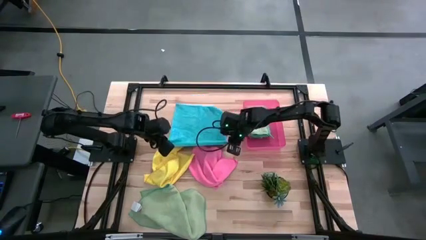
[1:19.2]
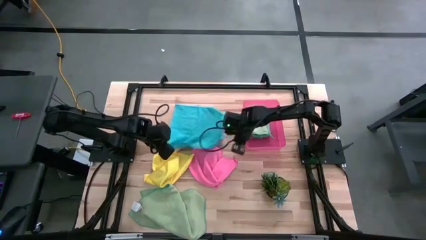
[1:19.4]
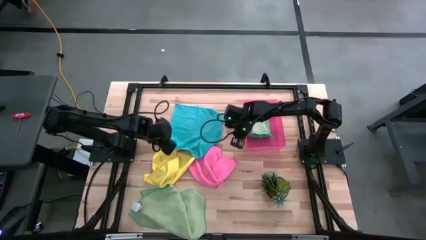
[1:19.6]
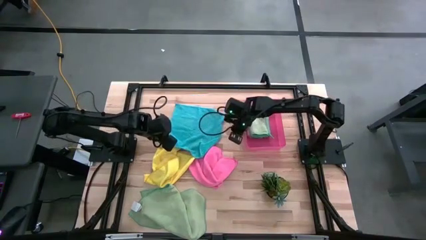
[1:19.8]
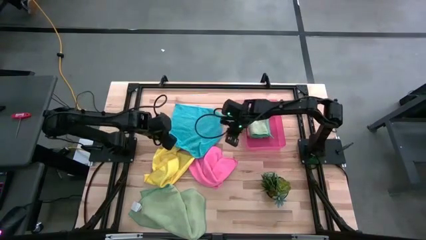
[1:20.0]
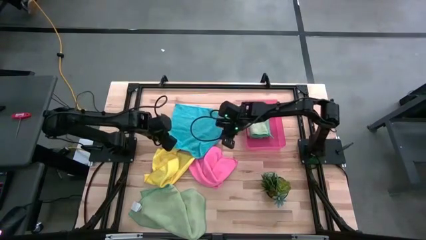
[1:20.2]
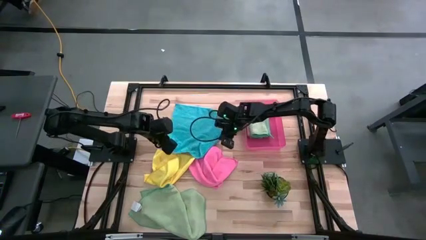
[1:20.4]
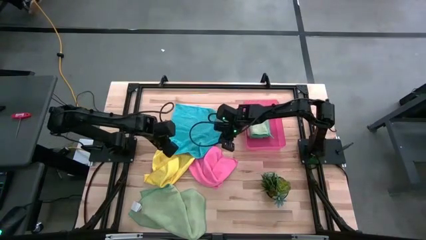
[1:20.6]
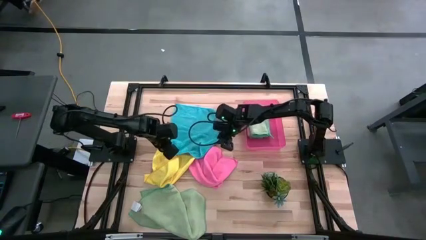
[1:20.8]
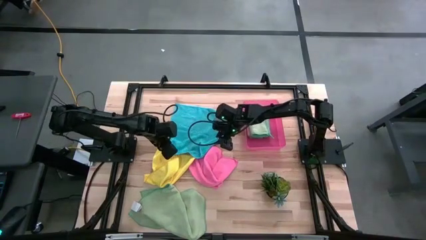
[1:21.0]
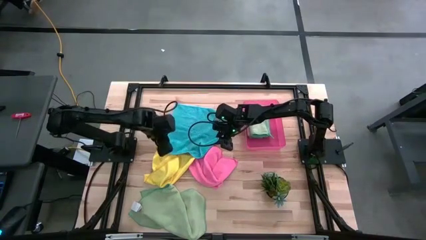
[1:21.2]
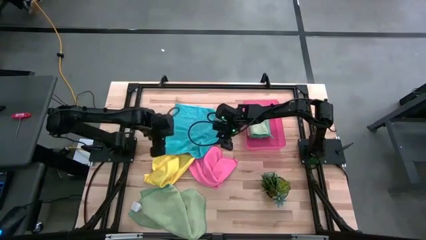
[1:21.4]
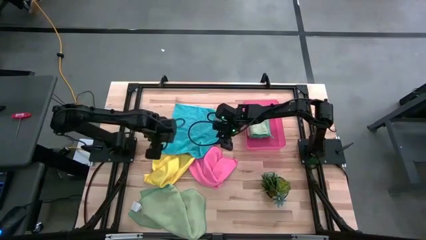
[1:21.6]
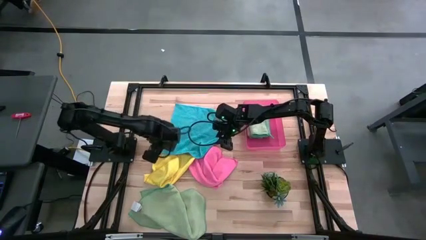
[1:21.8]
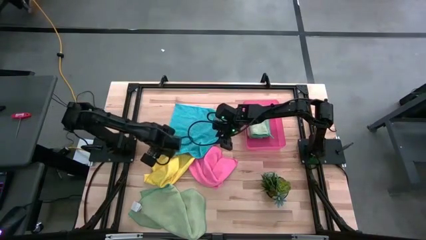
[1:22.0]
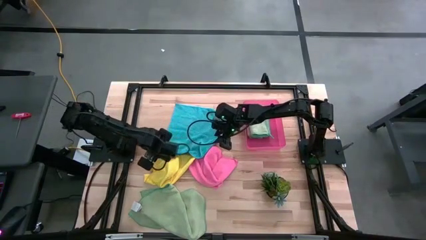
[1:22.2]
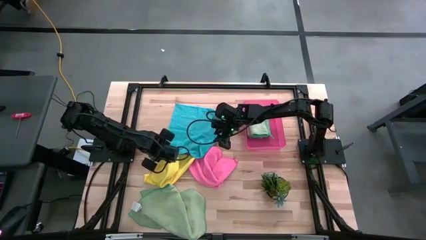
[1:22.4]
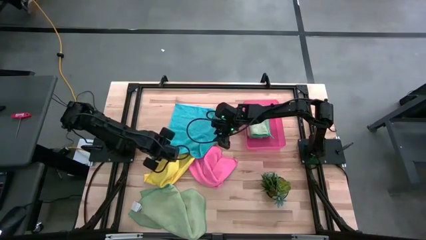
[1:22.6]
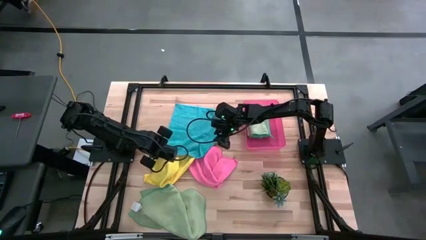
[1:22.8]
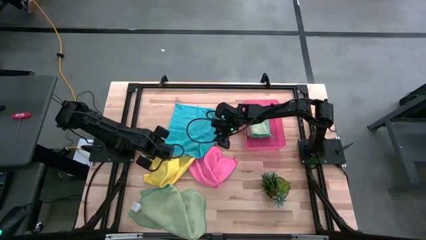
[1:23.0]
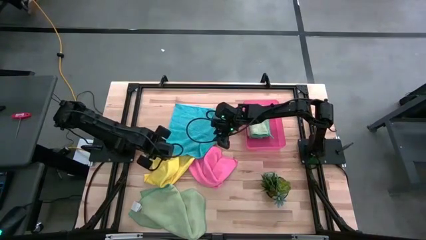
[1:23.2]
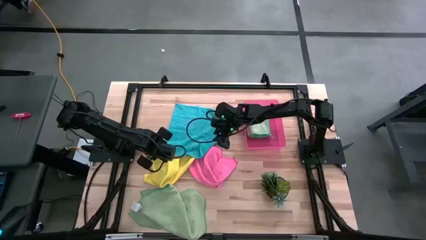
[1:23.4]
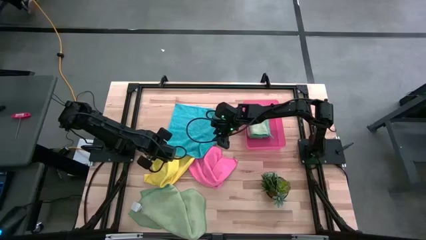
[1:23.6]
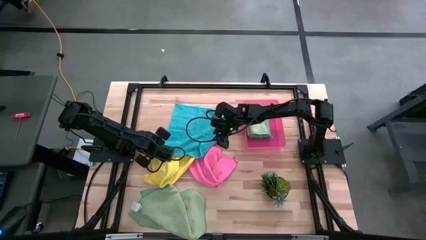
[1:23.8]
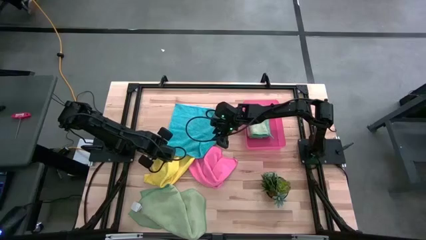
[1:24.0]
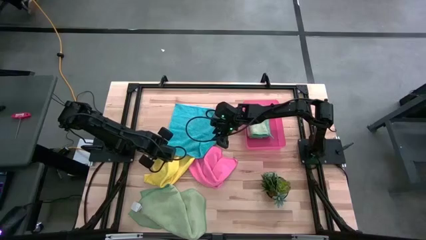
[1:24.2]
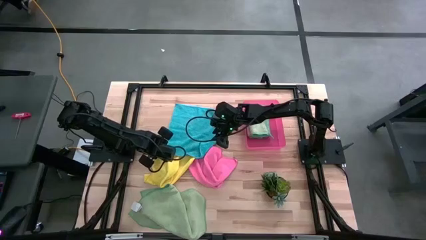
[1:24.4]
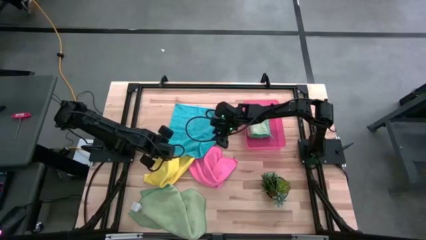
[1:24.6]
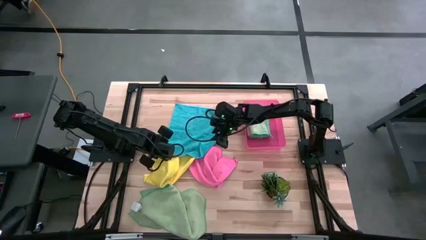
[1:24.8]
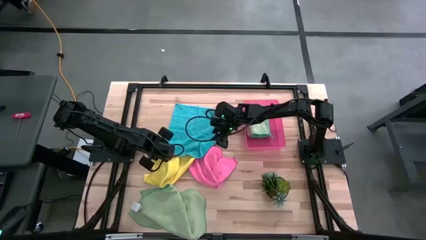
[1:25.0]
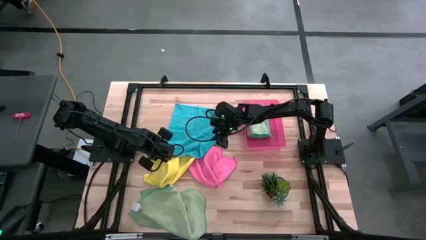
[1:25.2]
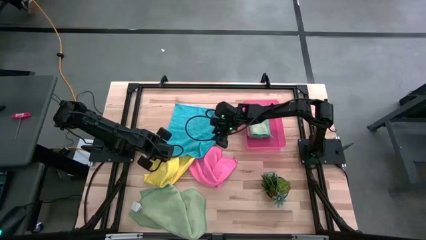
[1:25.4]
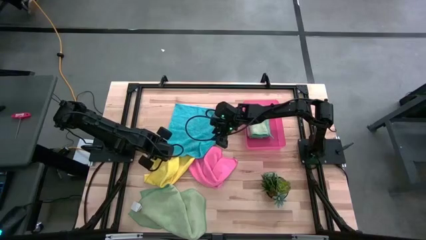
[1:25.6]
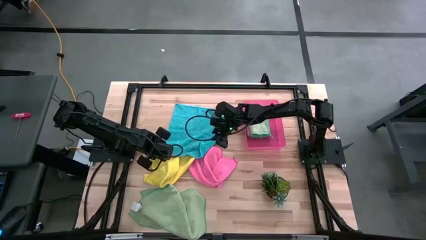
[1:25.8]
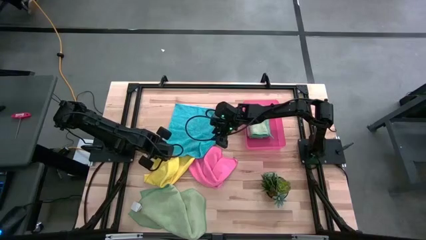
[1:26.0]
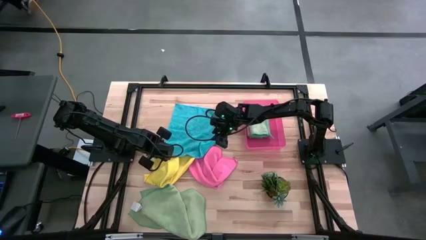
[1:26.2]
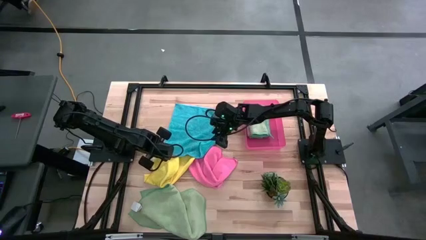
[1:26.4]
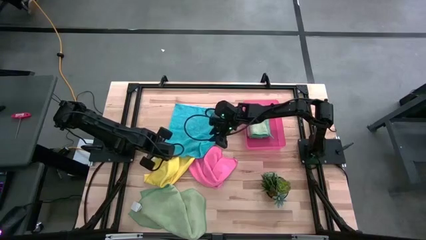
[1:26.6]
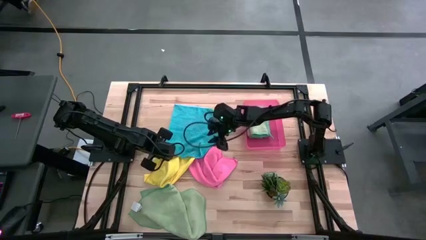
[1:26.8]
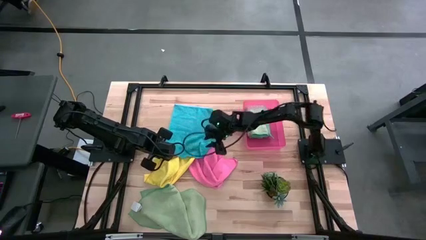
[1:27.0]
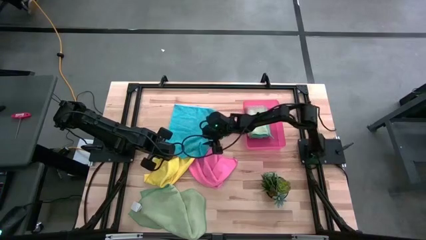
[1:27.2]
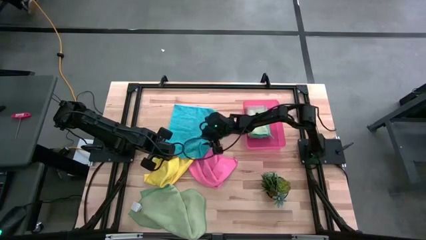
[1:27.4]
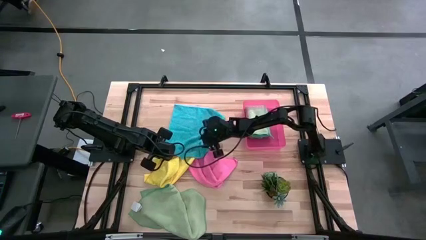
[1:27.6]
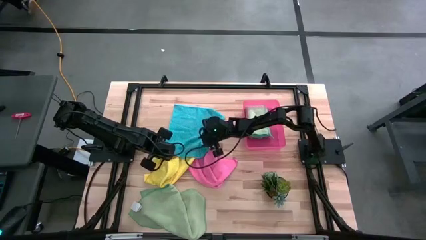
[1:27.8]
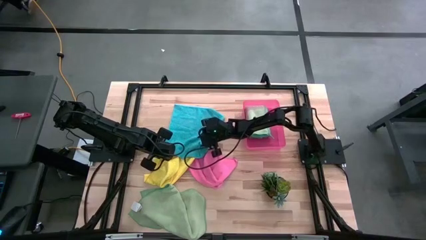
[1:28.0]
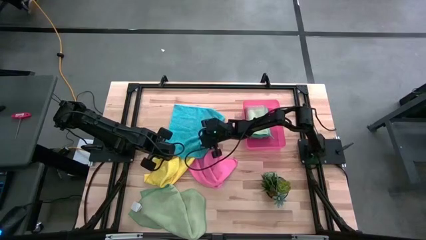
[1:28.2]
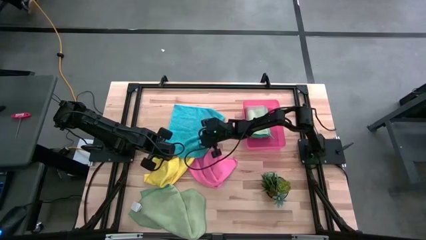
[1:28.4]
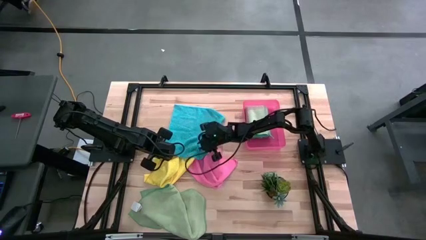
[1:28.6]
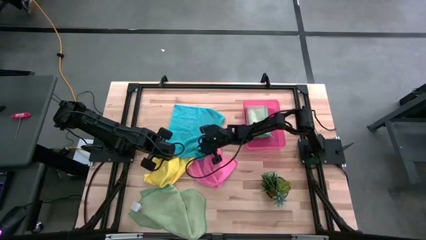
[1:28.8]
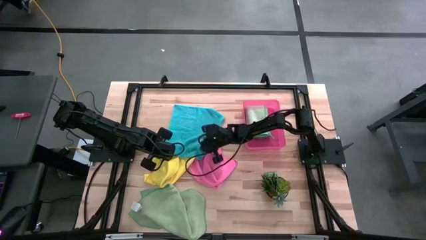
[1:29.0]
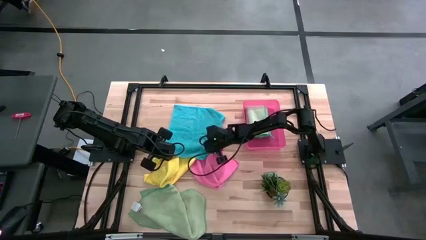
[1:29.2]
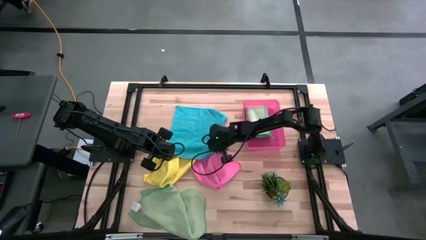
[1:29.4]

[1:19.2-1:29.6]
Task: Fold microfiber towels
Fold the blue microfiber cloth

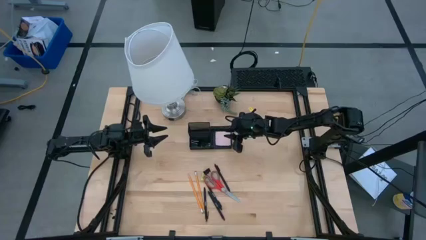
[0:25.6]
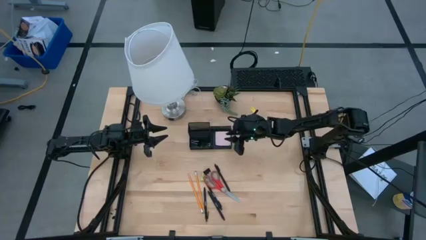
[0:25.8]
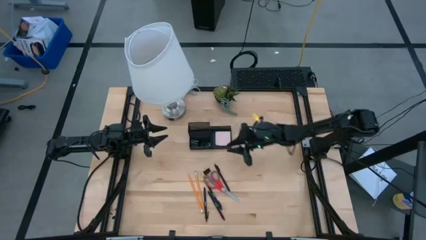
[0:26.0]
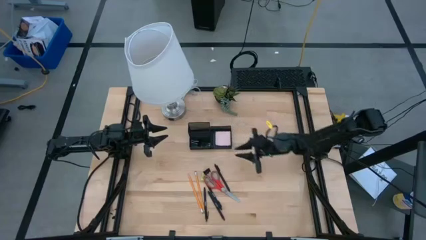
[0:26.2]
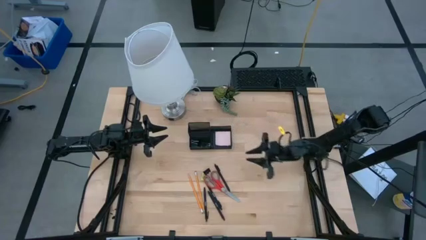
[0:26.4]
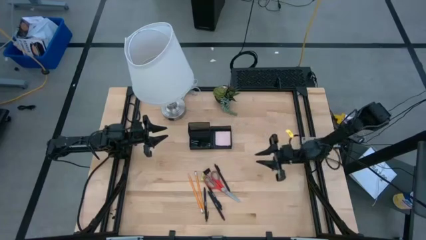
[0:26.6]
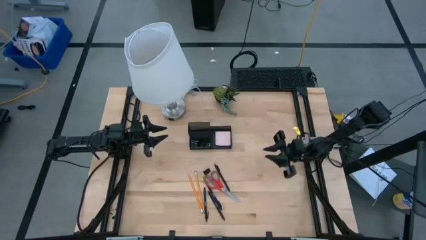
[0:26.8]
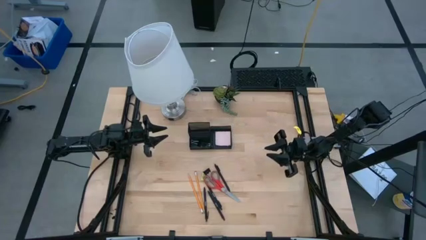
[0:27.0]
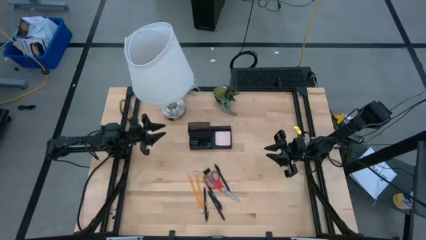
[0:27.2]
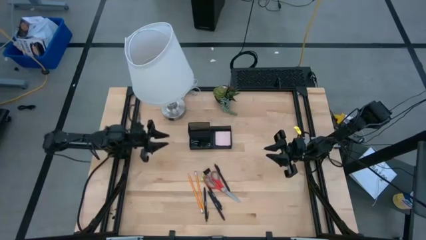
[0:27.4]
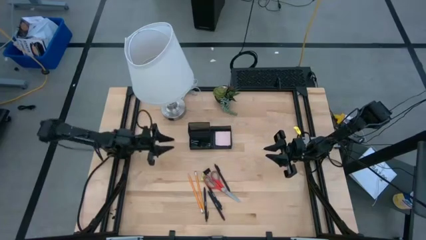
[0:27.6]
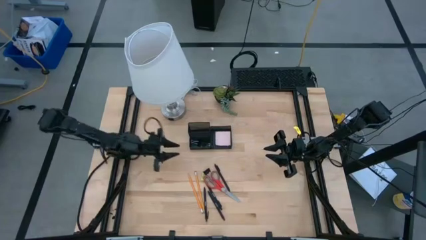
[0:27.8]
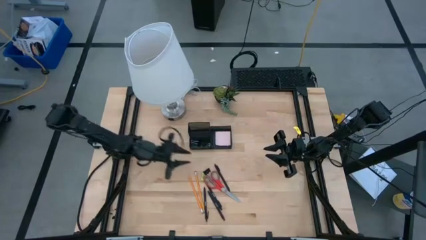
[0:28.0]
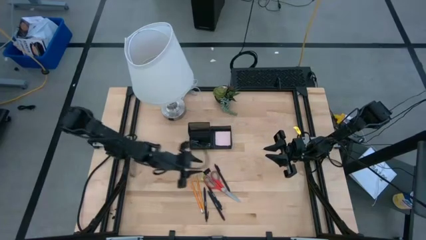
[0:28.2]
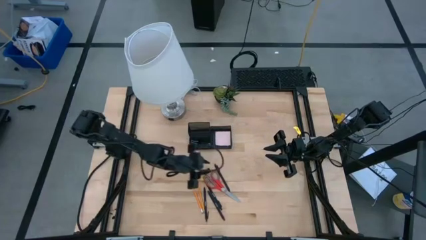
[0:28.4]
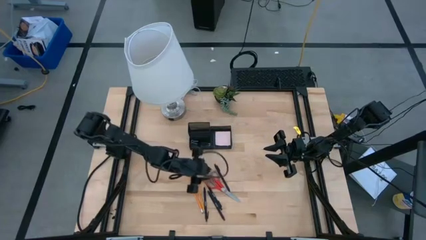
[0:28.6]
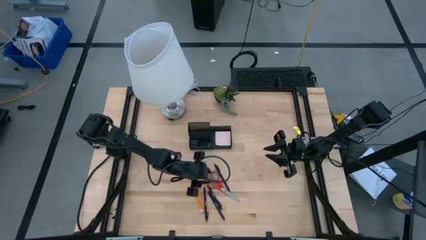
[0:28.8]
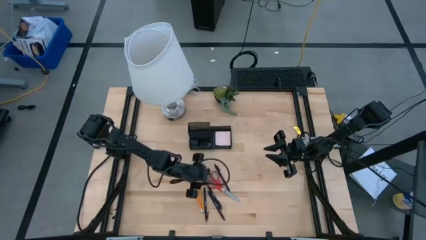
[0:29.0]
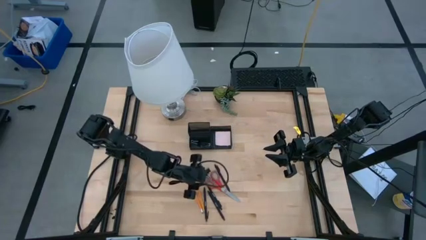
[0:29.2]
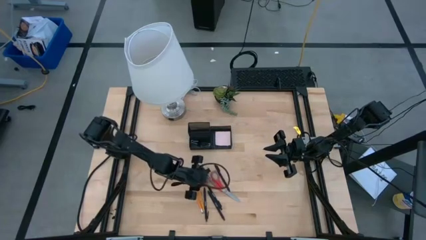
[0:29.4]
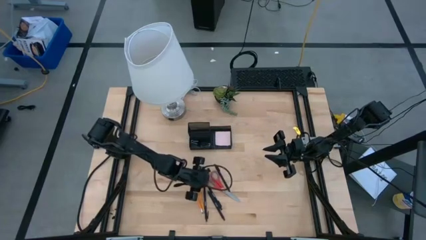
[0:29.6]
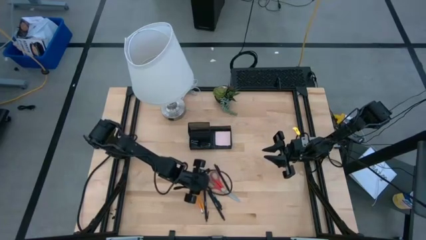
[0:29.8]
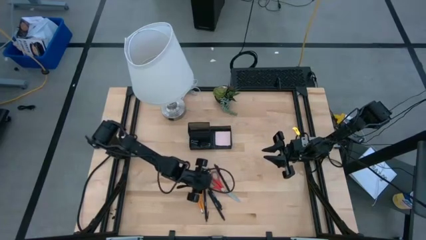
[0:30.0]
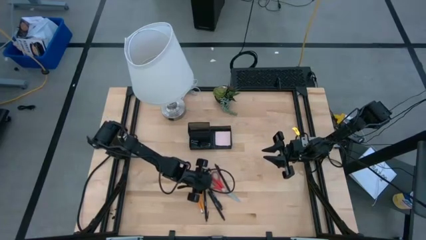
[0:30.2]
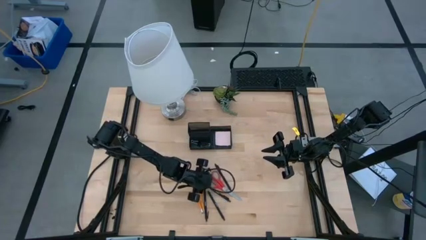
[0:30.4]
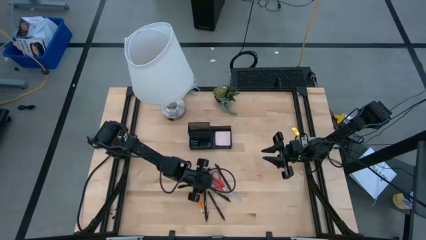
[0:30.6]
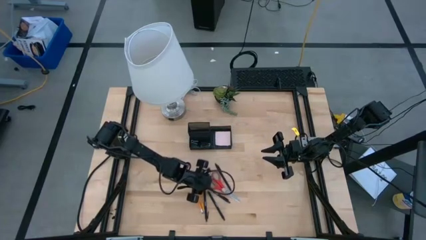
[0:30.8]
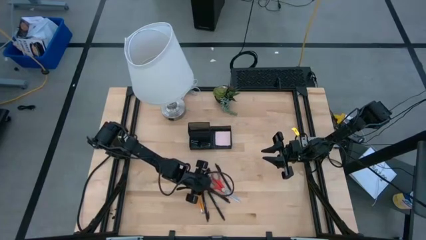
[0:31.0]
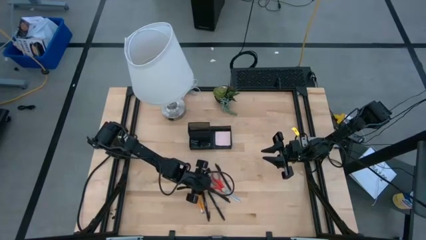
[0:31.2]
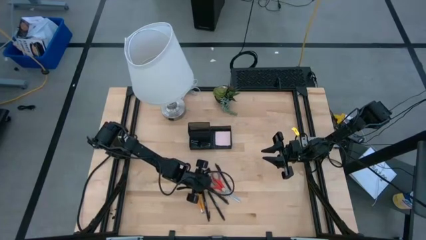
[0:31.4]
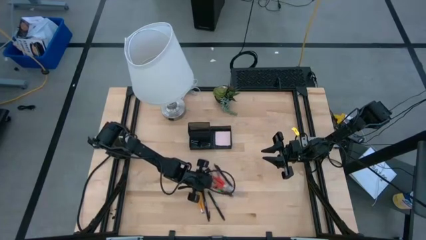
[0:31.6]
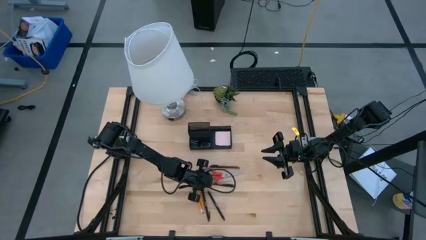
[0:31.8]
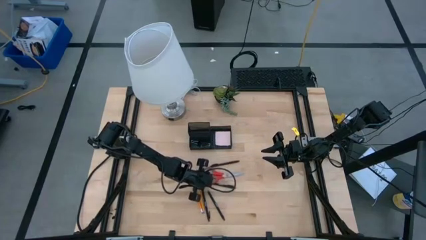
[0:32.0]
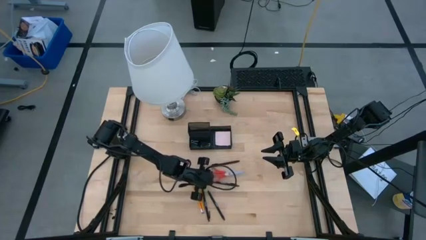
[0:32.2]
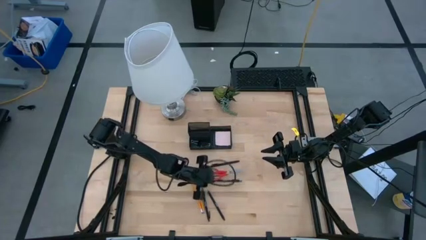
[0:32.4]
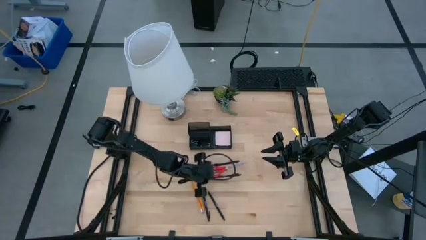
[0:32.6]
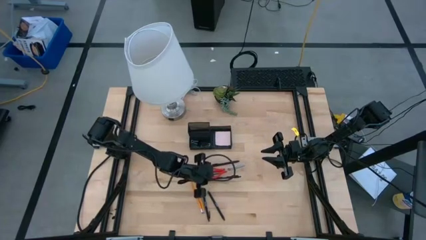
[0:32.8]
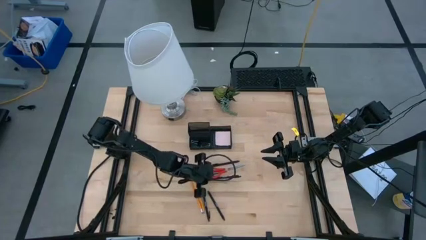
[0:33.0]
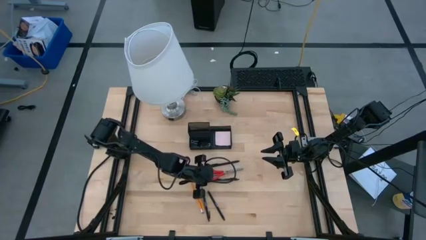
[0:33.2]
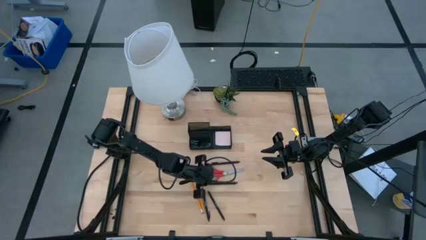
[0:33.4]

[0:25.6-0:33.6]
Task: Pick and place office supplies into organizer
Put the scissors into the black desk organizer
